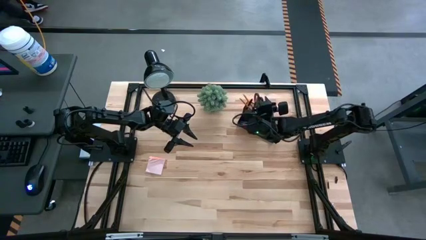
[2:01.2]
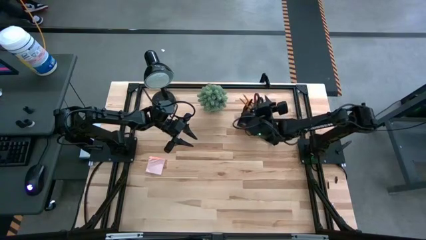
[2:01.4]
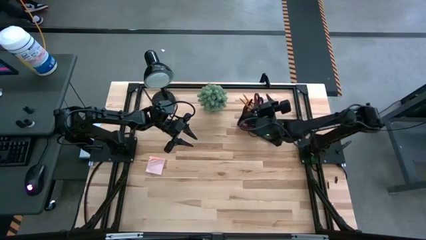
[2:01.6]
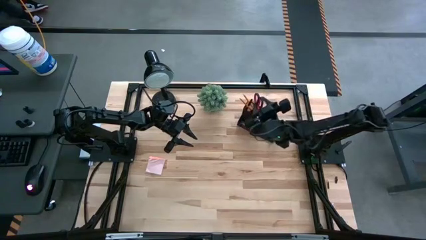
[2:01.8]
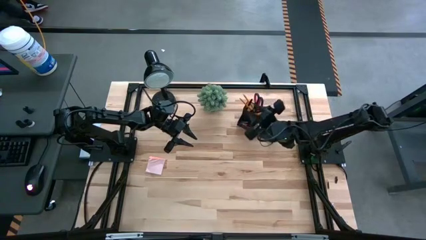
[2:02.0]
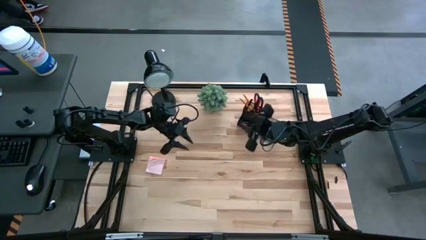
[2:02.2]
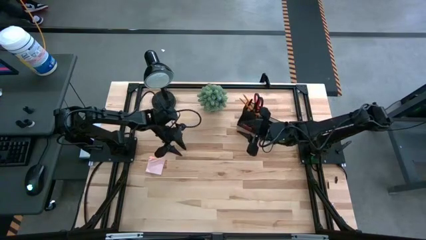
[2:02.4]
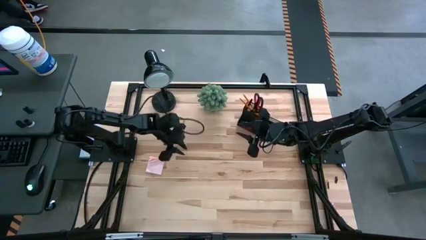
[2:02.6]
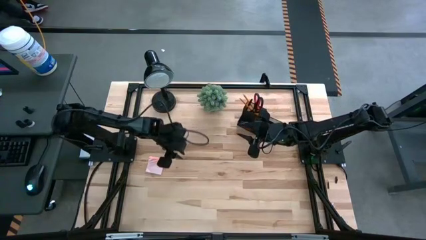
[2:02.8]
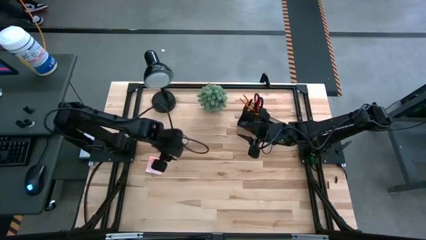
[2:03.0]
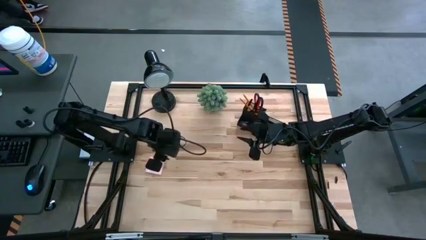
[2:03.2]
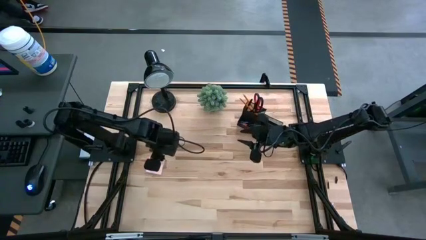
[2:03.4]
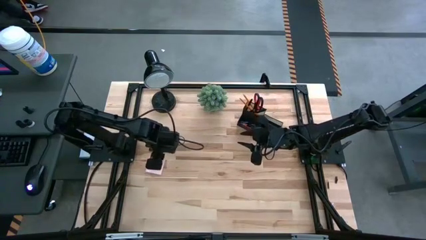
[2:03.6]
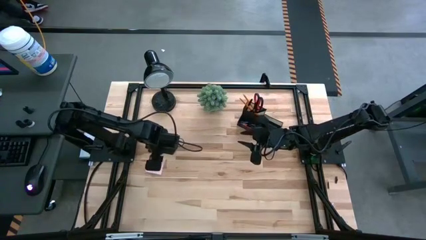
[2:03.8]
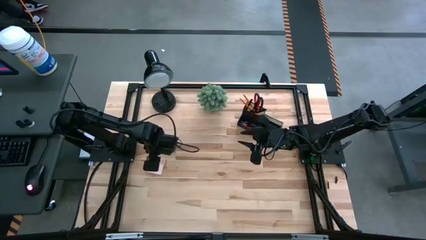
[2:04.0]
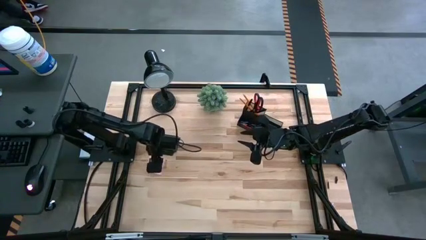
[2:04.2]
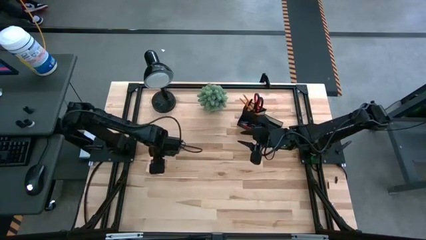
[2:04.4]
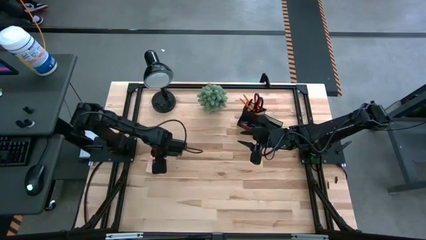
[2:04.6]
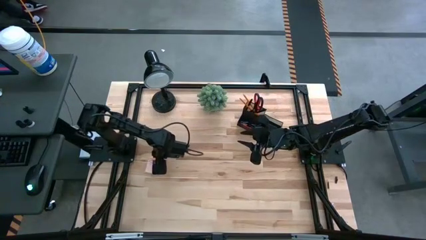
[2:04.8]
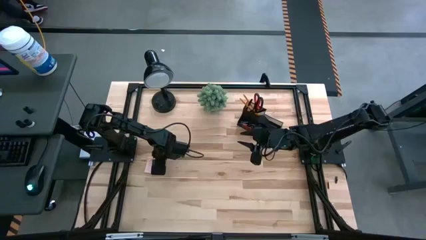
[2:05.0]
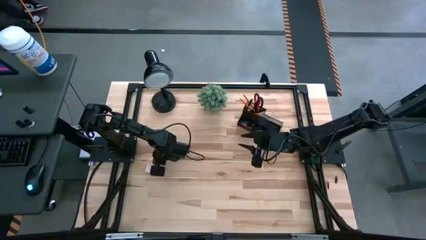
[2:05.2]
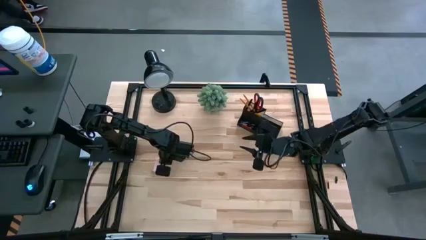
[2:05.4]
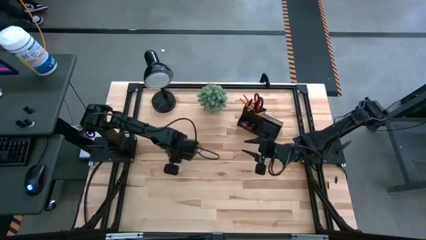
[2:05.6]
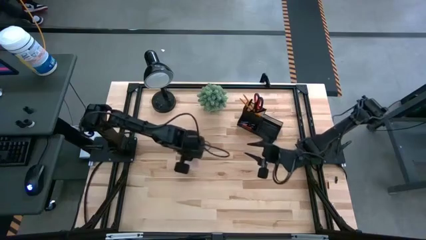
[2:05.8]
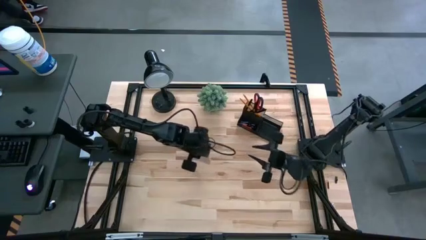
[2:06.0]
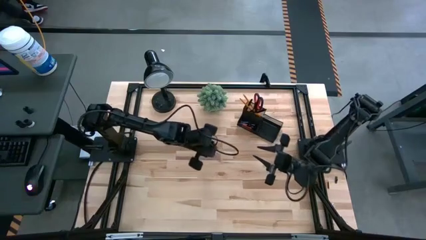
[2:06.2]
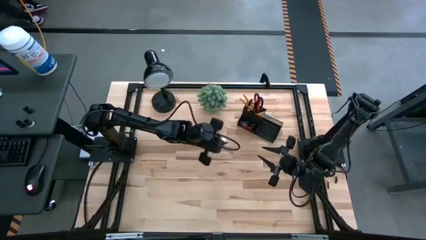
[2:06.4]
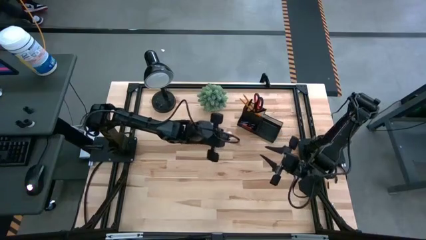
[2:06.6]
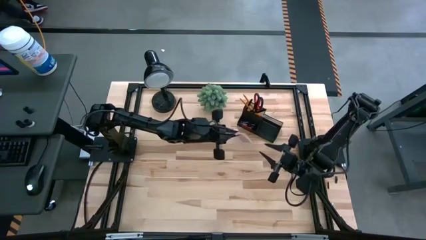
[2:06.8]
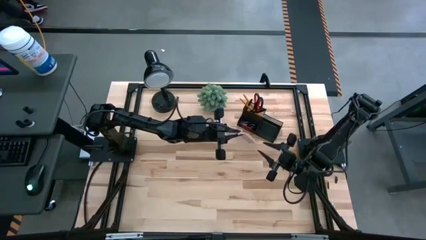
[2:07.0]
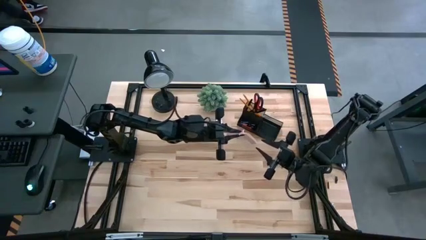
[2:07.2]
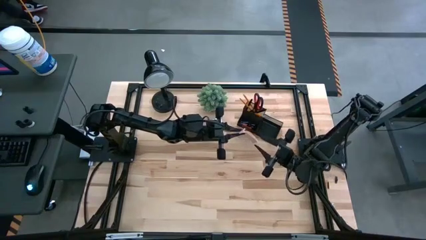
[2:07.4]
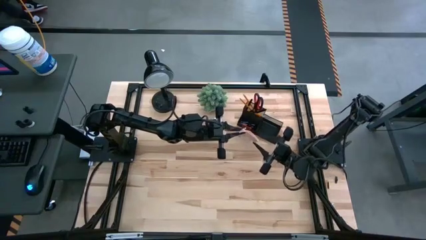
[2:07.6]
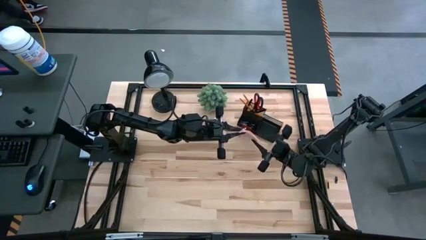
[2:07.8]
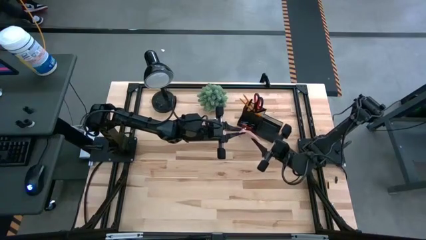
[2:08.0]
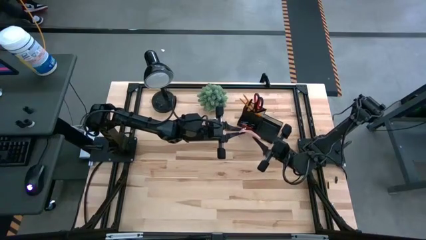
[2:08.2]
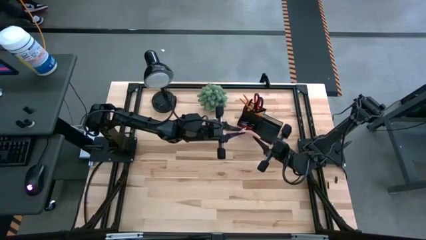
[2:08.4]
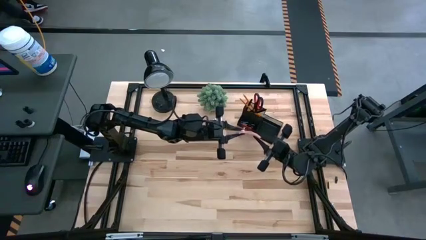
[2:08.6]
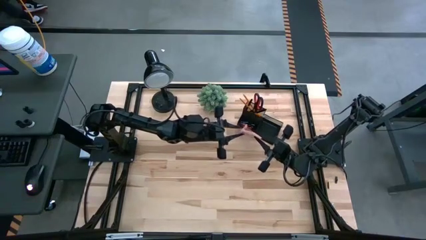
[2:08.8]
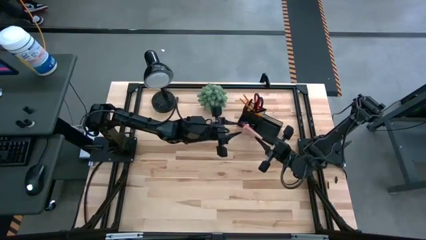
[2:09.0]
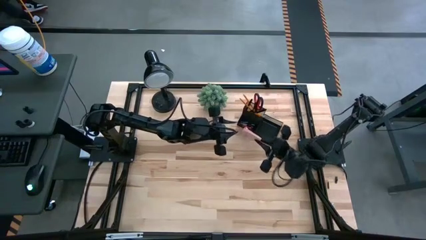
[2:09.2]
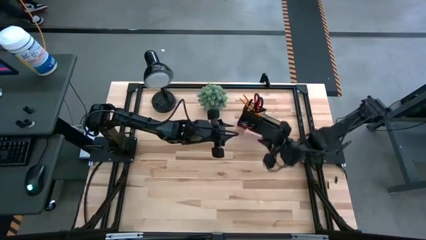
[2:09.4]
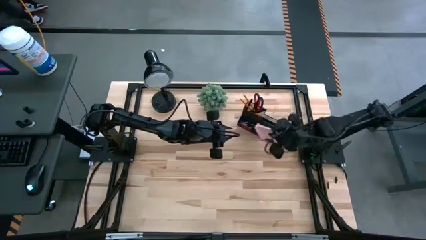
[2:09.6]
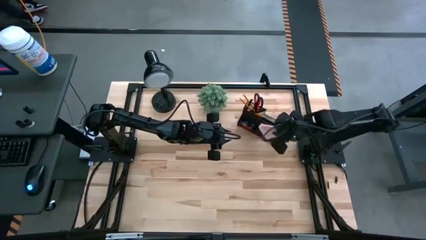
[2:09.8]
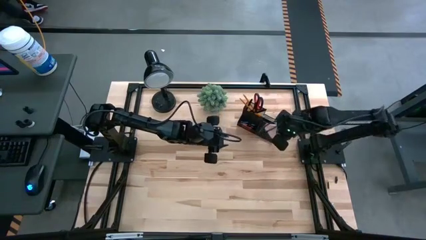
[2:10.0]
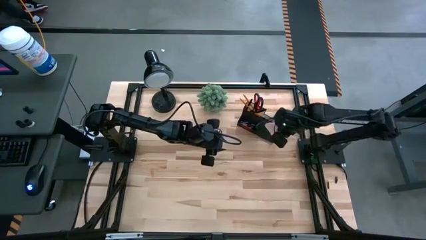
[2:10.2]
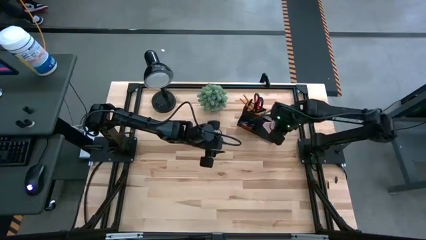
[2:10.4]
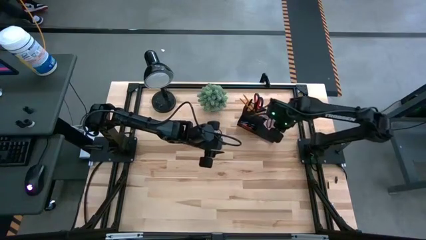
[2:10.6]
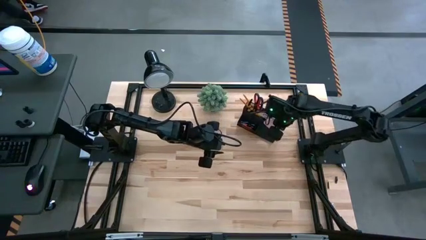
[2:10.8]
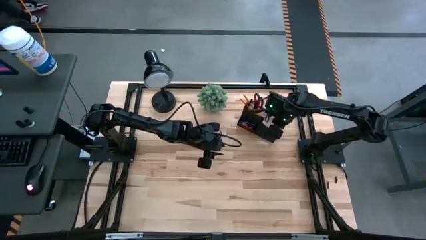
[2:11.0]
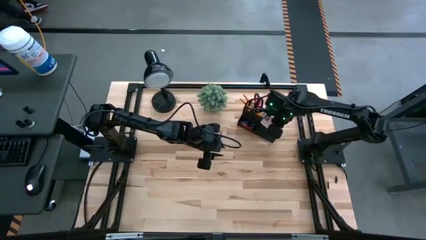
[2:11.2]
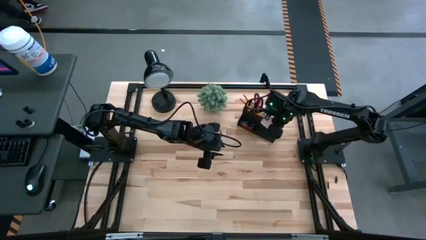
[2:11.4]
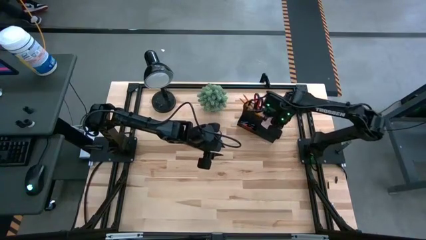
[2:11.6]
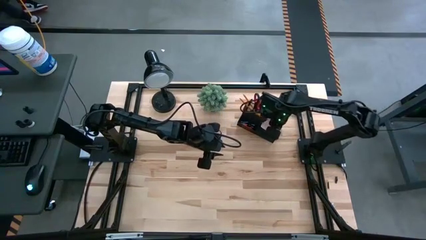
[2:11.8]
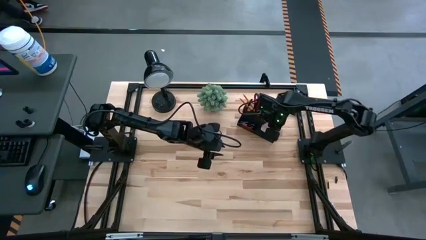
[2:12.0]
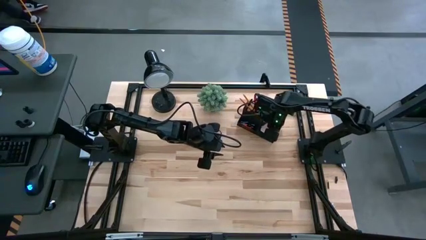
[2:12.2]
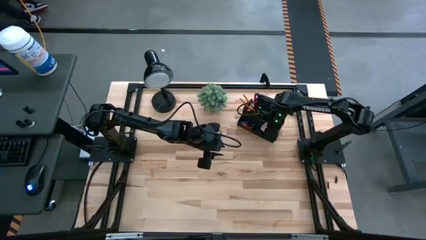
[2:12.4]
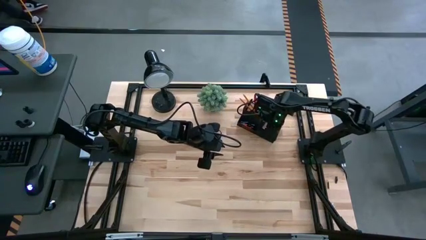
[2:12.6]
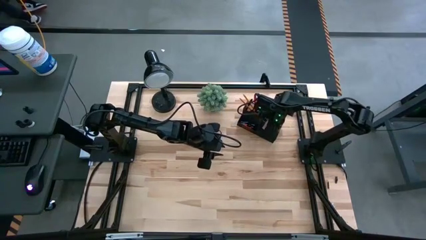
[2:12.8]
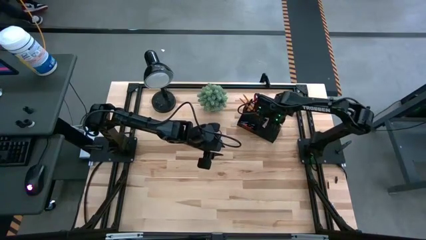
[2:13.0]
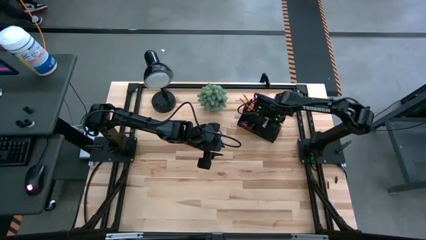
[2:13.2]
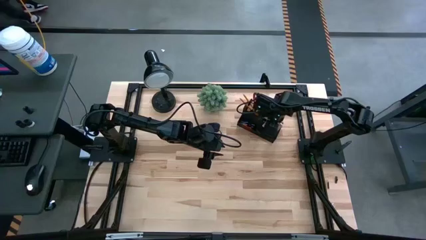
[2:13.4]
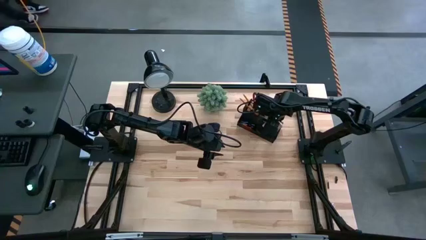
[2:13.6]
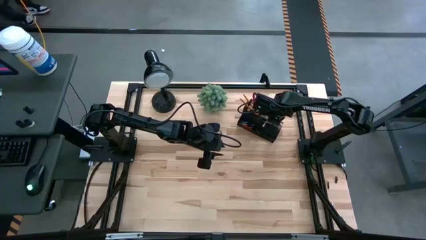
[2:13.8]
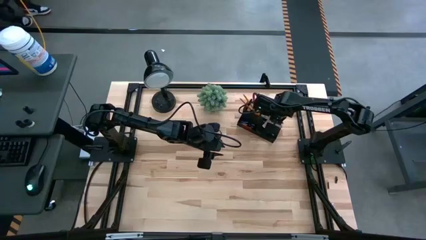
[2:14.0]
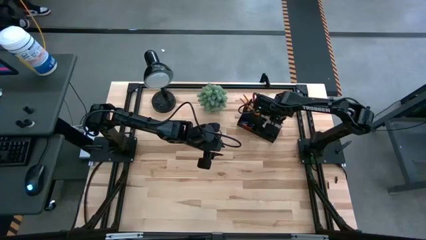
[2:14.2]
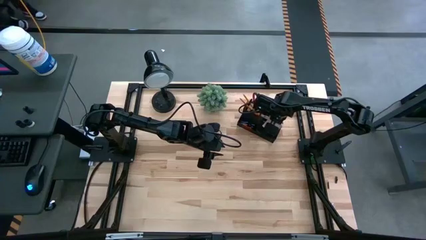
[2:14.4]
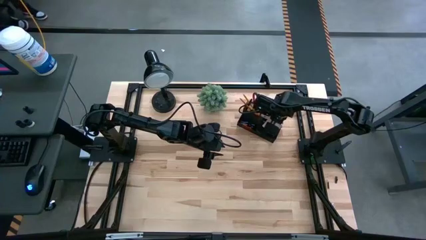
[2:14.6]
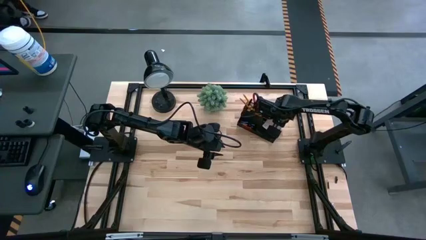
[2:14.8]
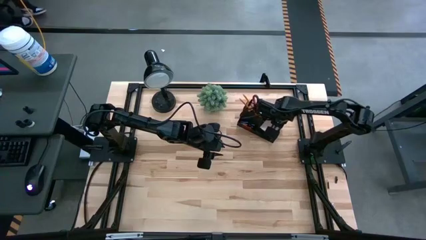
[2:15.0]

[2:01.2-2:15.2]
Task: Pick and place office supplies into organizer
Put the pink sticky notes into the black desk organizer
